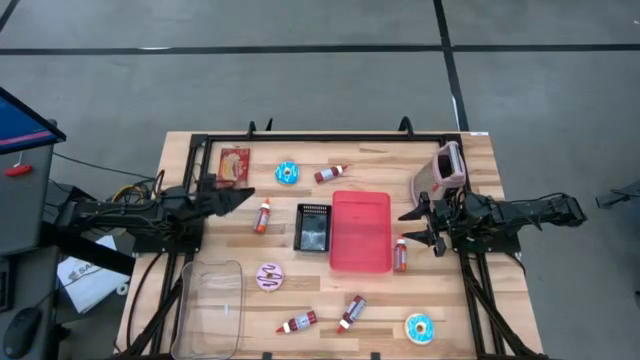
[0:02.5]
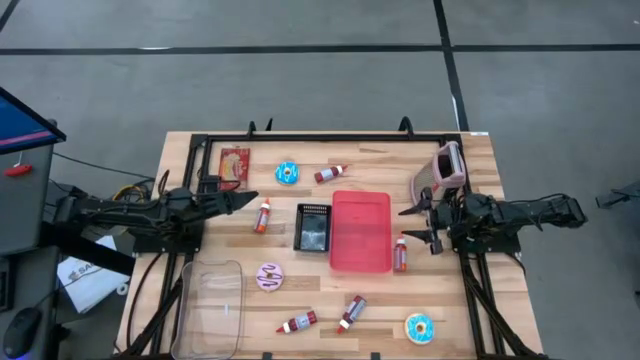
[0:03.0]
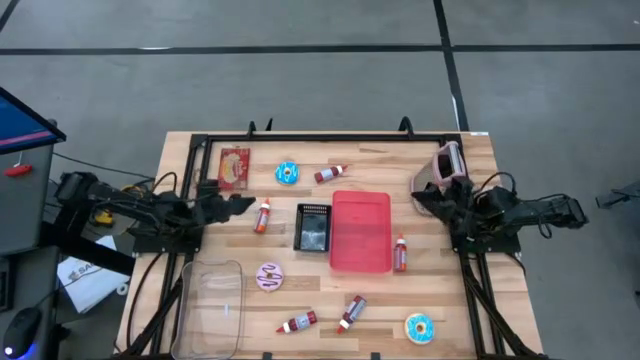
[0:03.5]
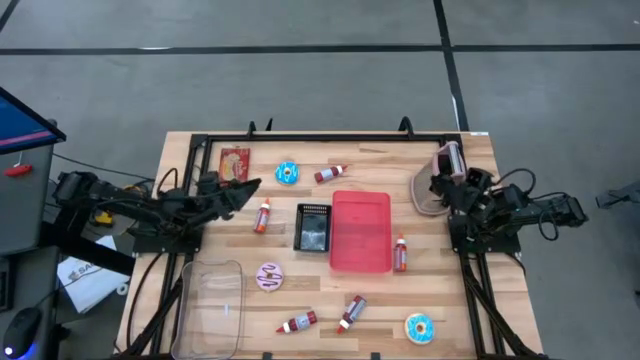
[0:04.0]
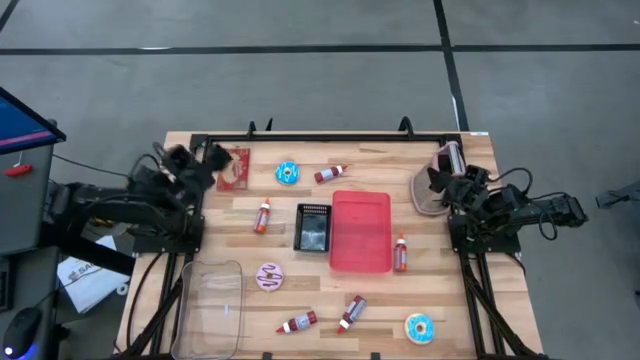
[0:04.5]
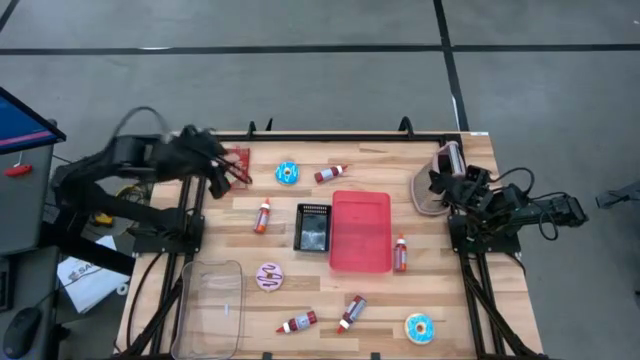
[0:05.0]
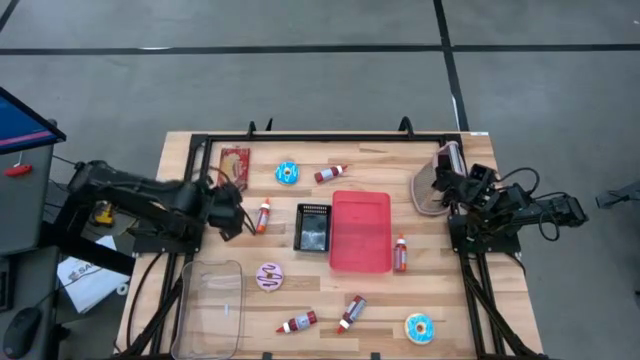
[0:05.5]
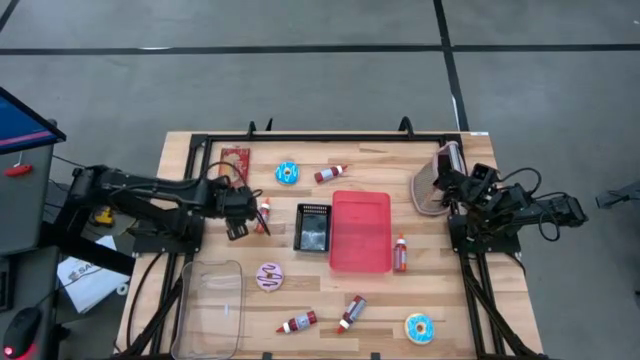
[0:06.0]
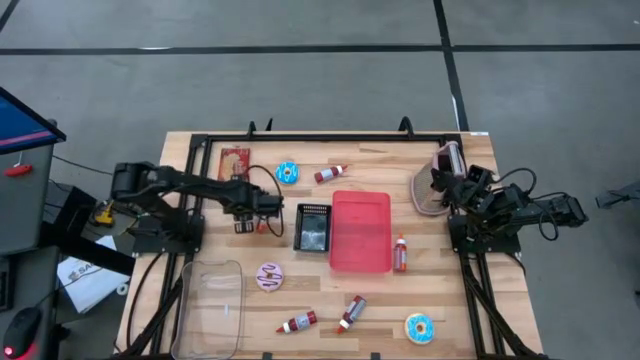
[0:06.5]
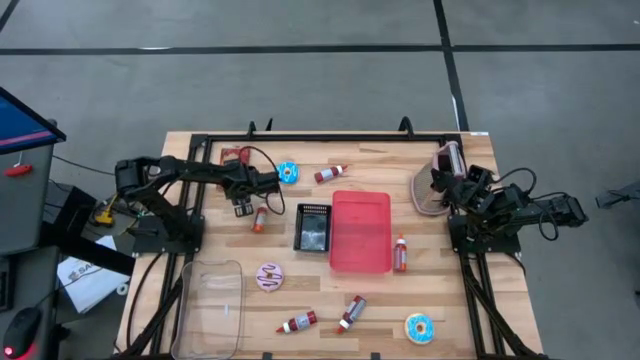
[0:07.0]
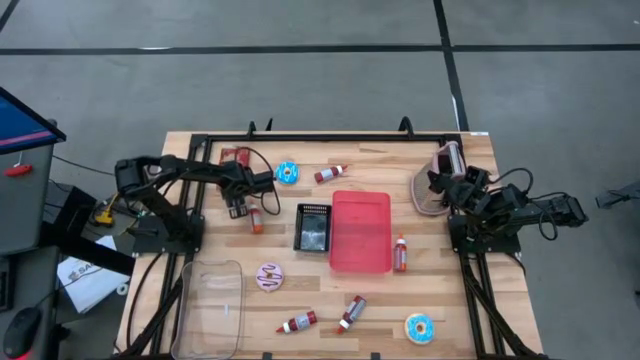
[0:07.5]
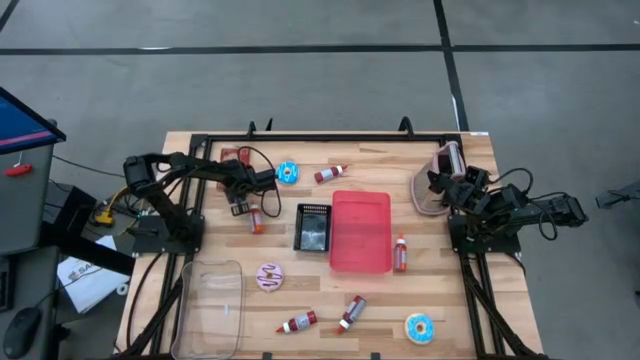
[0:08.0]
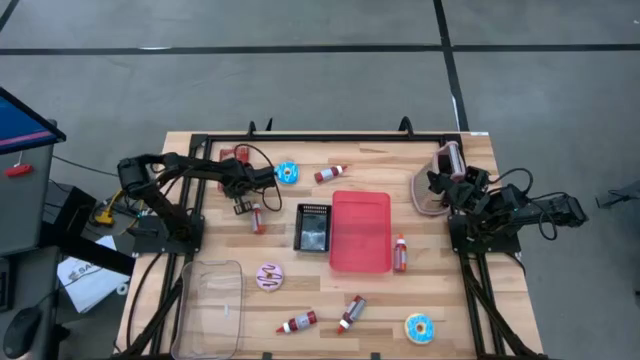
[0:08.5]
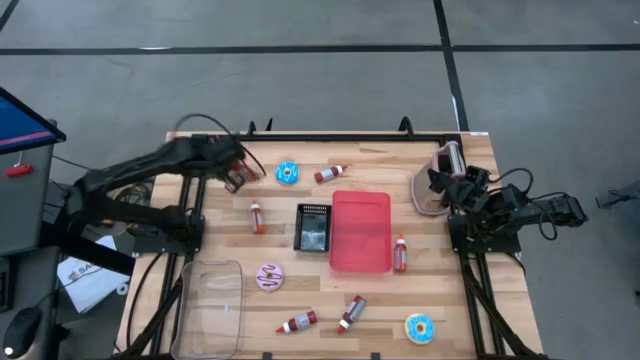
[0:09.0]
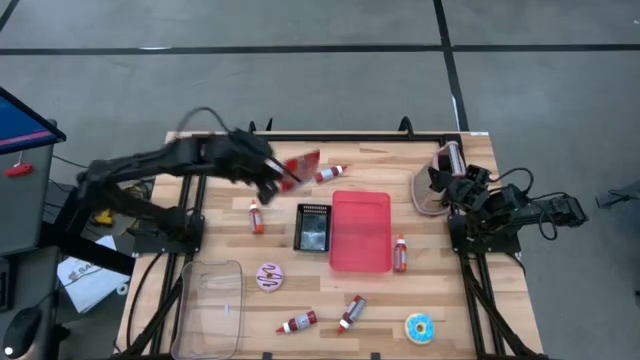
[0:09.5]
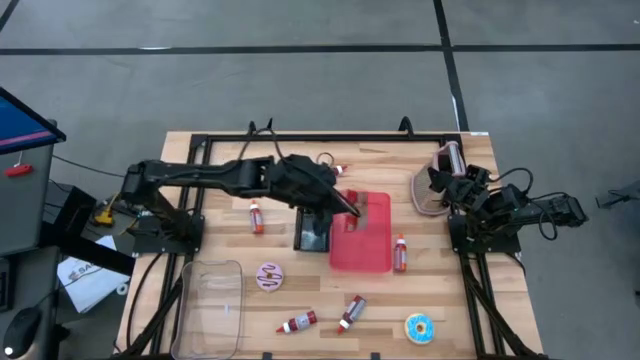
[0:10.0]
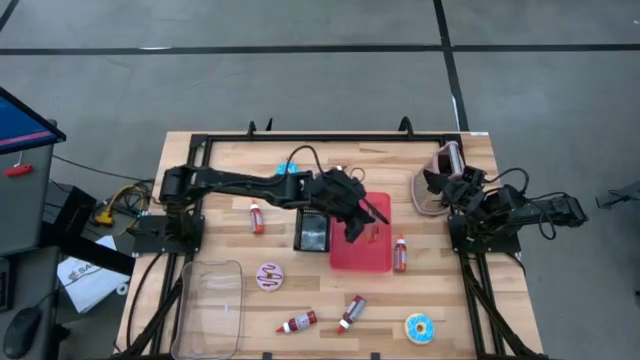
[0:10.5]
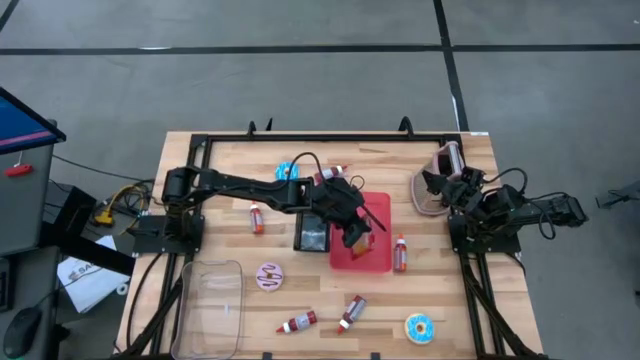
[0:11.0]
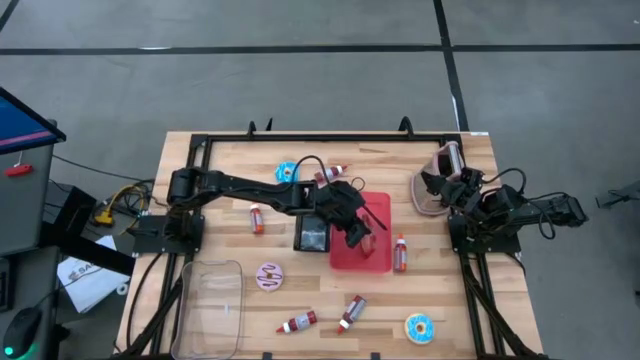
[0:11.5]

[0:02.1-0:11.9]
Put the red popcorn bag into the red bin

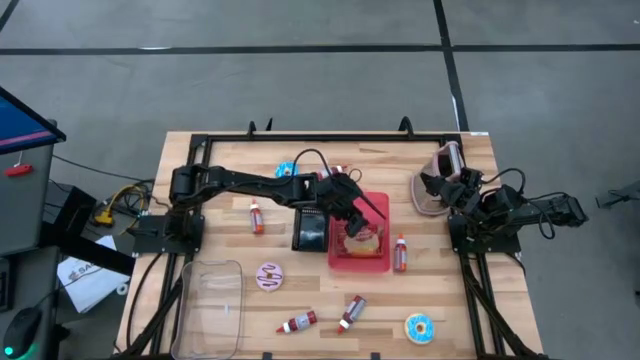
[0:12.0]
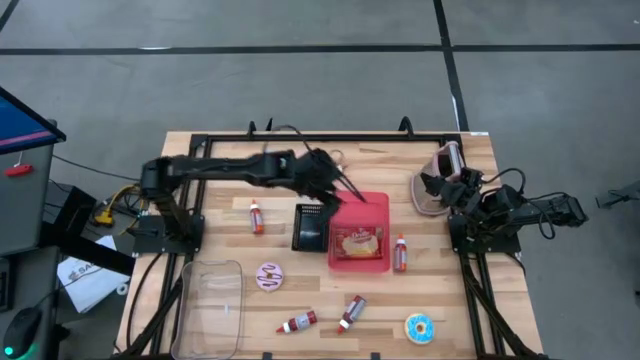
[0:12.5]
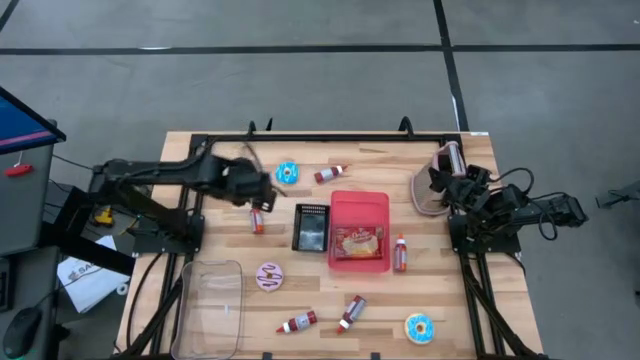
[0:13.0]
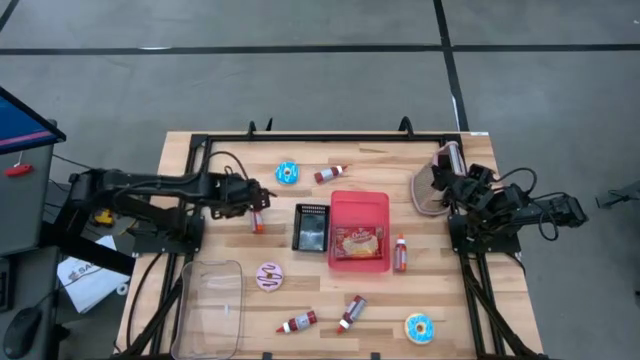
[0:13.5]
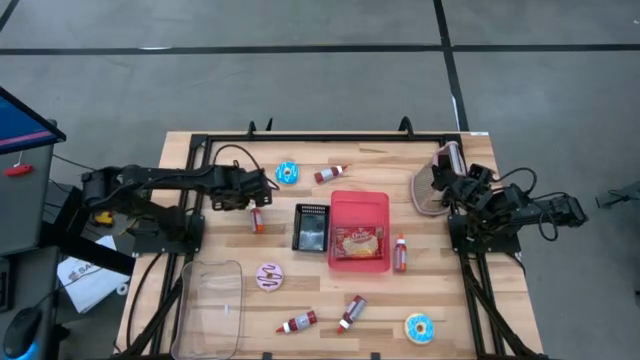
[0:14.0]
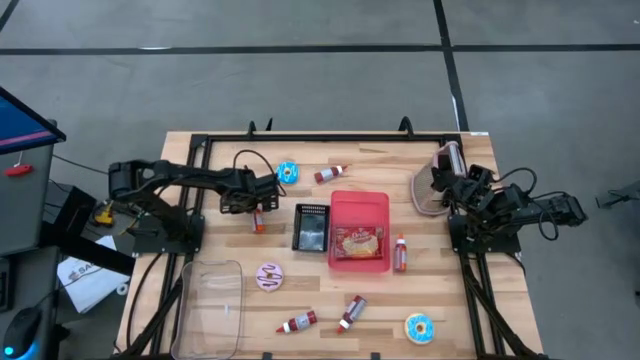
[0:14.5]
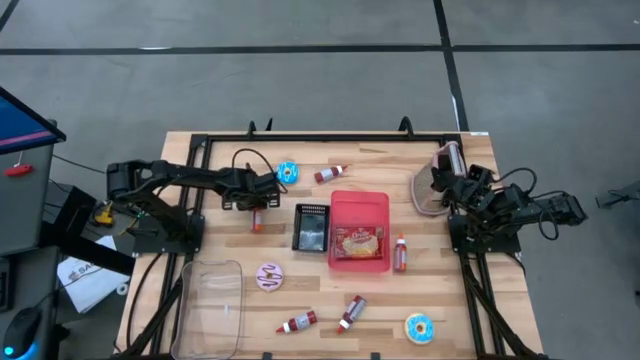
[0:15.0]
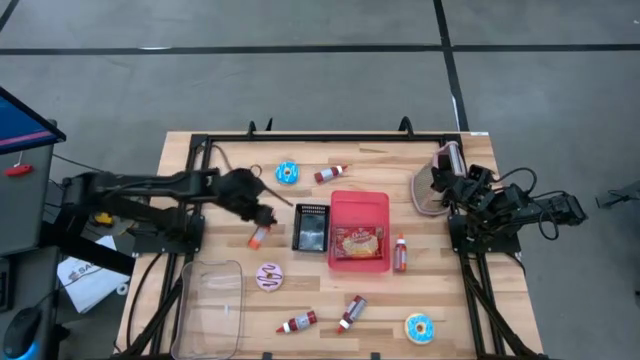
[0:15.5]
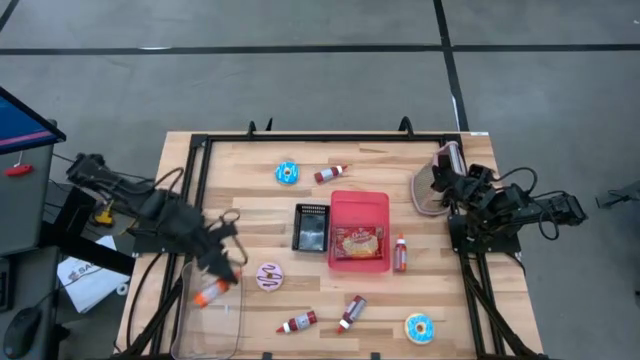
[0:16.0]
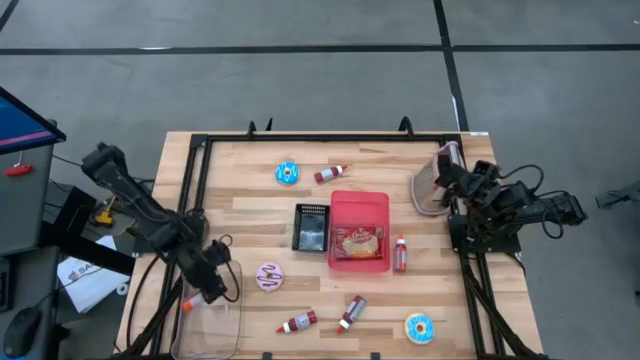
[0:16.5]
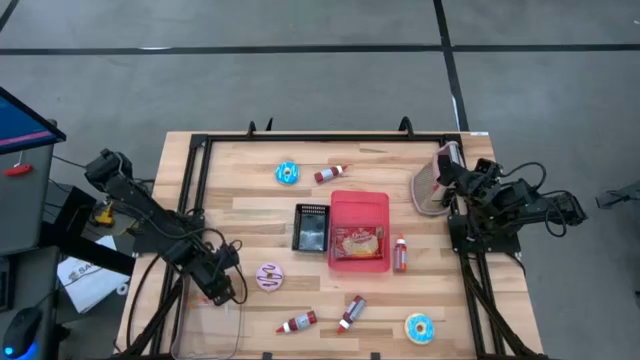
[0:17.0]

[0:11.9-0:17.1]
Put the left orange food coloring bottle into the transparent bin

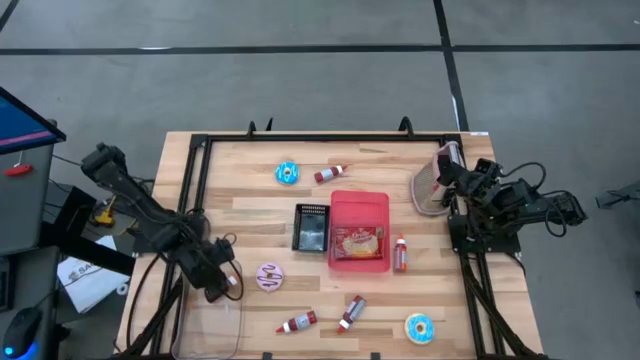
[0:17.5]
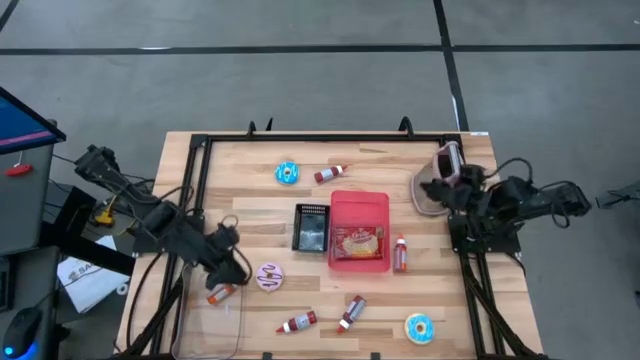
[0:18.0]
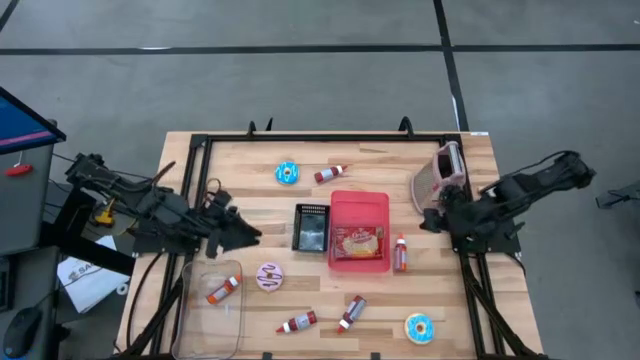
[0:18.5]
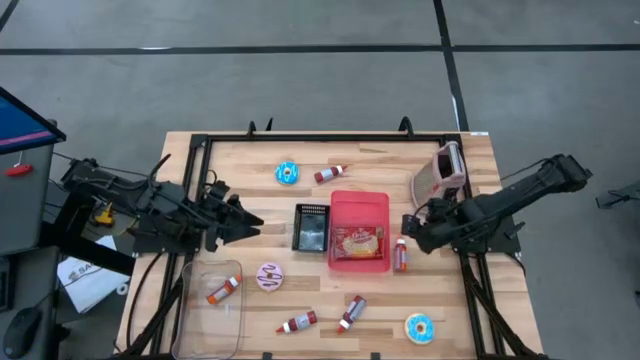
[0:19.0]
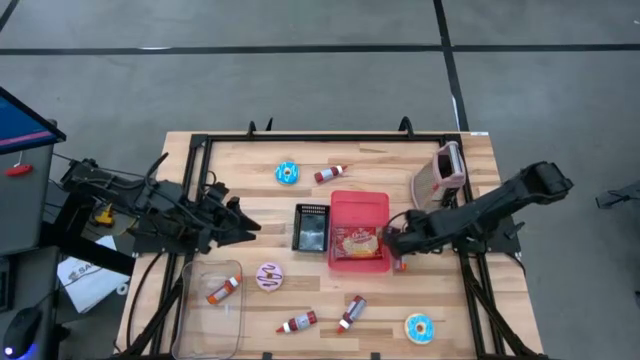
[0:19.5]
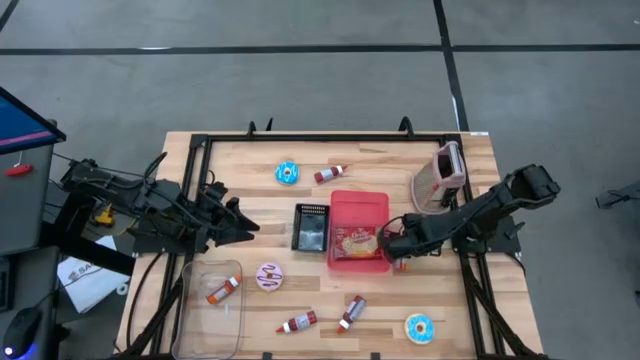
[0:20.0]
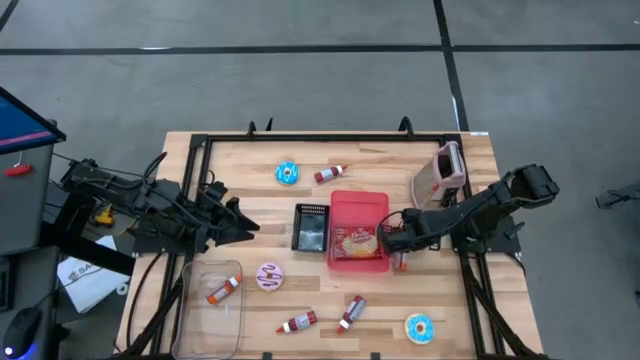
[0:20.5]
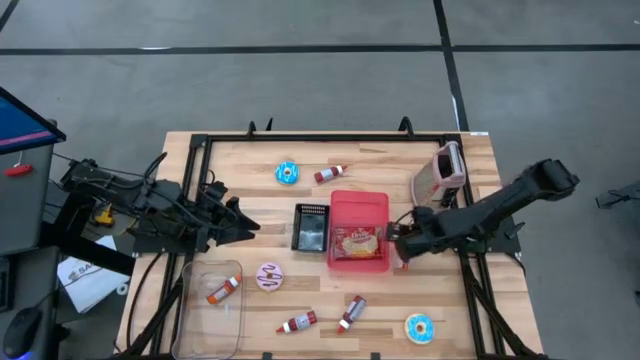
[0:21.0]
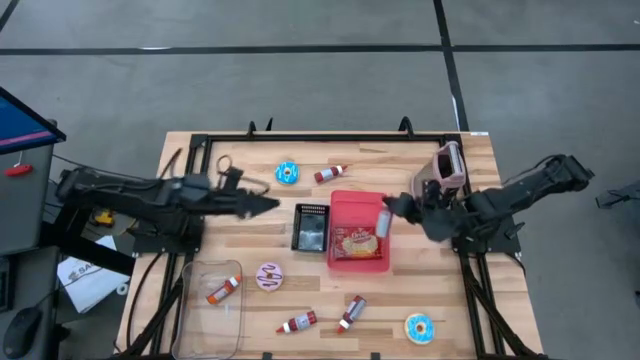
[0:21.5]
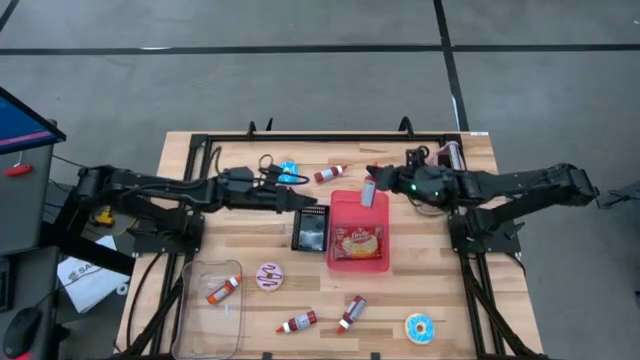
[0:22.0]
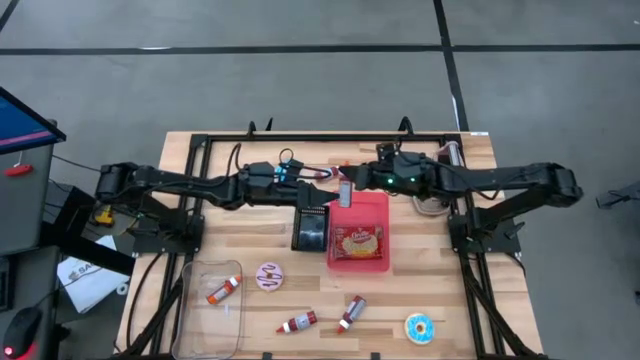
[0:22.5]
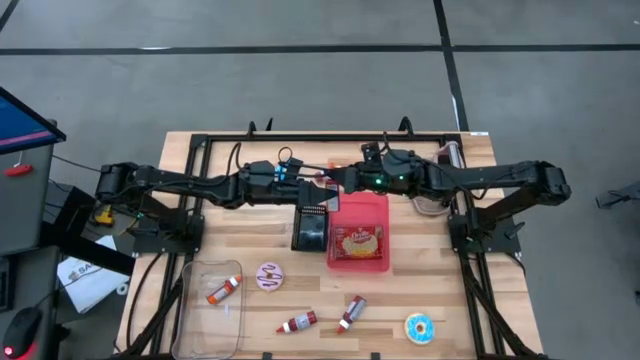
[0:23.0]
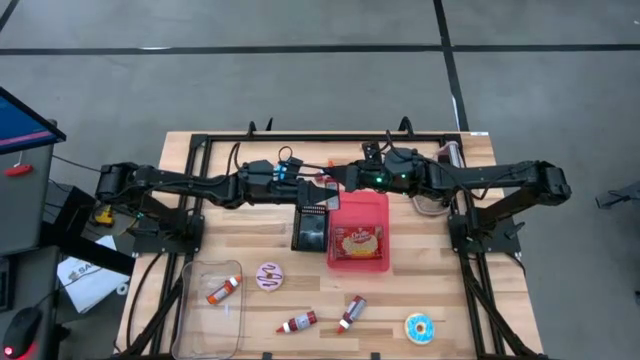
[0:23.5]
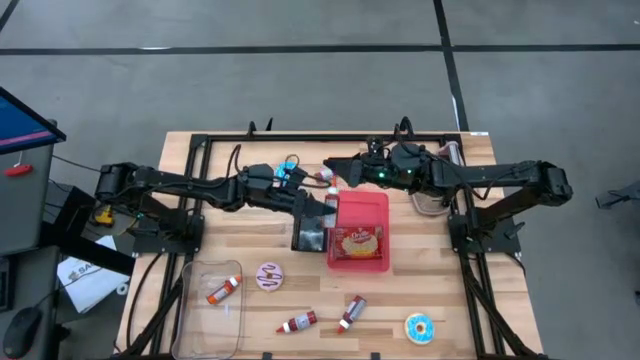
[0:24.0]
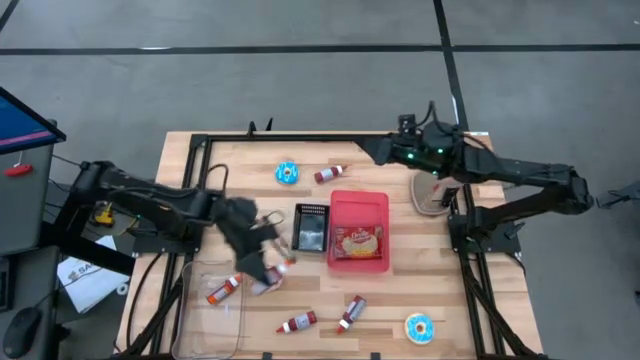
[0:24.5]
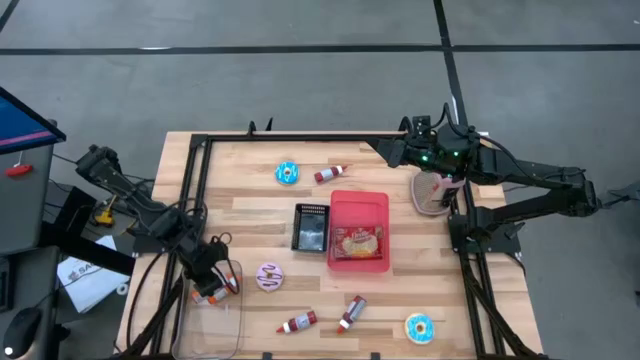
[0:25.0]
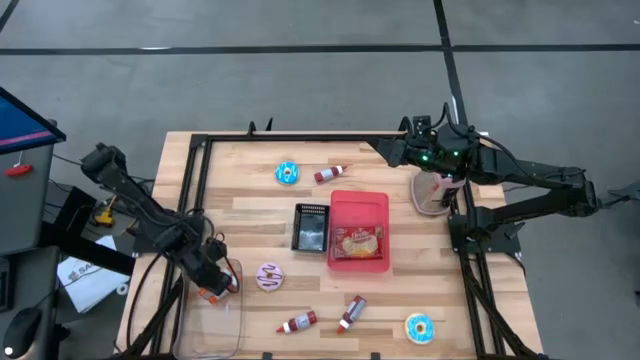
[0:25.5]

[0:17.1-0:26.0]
Put the orange food coloring bottle into the transparent bin
